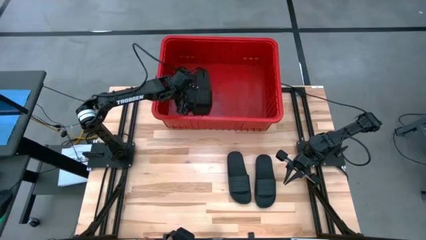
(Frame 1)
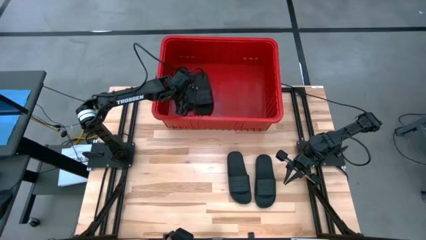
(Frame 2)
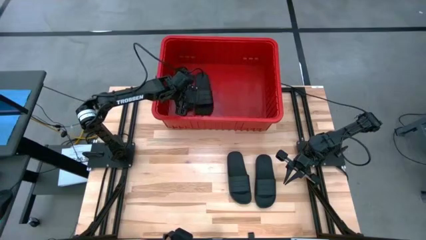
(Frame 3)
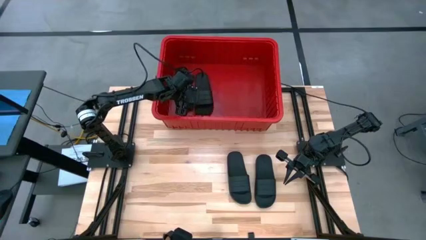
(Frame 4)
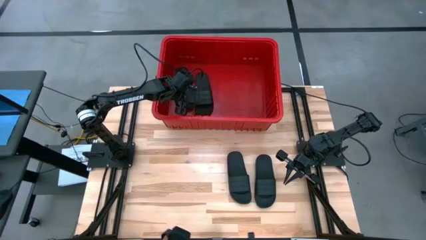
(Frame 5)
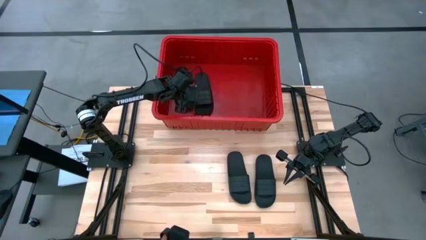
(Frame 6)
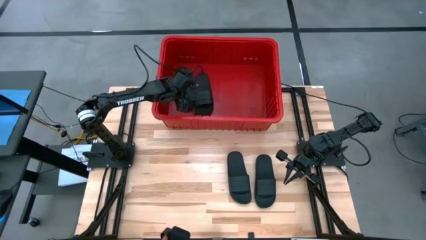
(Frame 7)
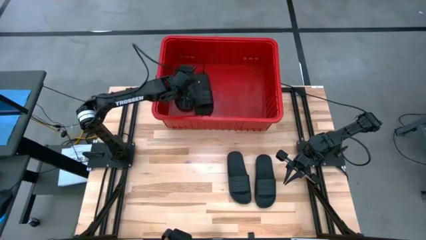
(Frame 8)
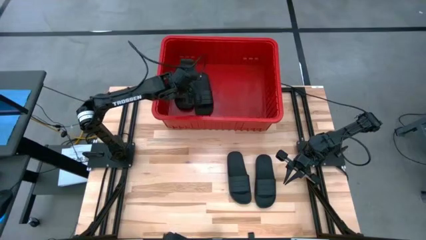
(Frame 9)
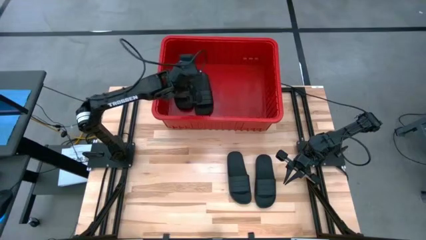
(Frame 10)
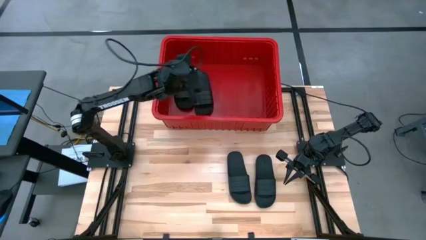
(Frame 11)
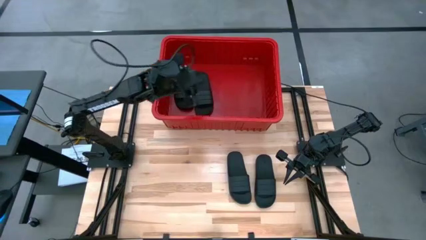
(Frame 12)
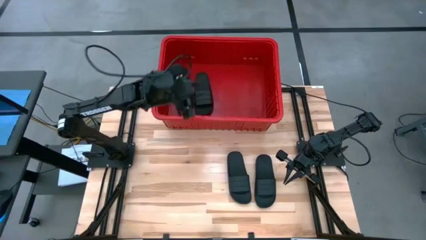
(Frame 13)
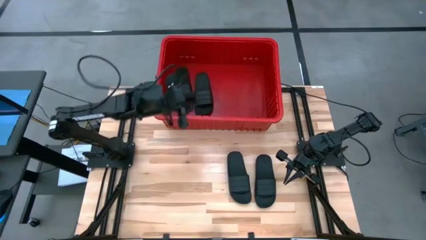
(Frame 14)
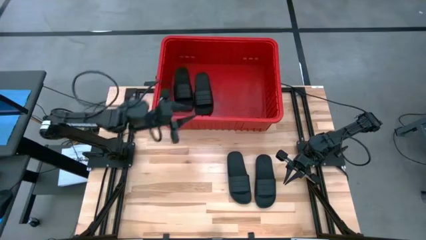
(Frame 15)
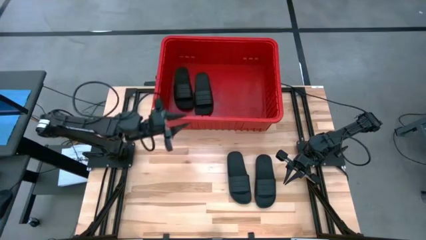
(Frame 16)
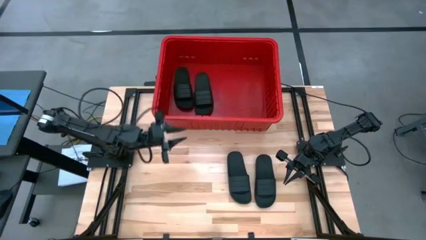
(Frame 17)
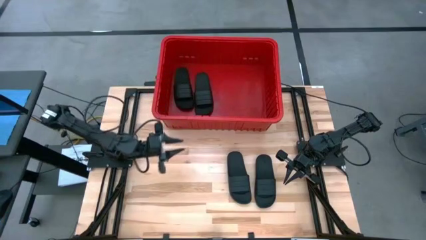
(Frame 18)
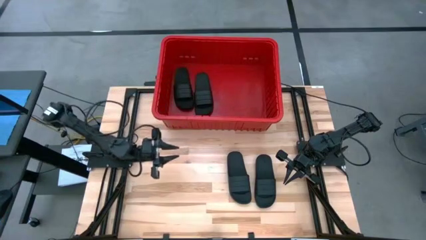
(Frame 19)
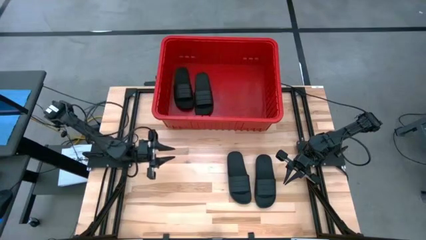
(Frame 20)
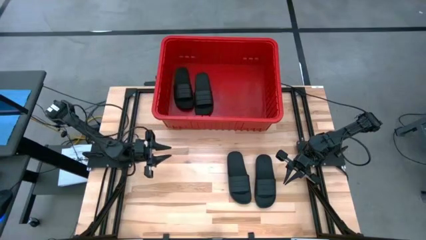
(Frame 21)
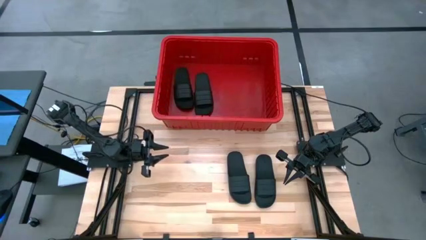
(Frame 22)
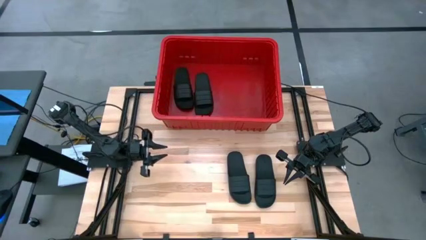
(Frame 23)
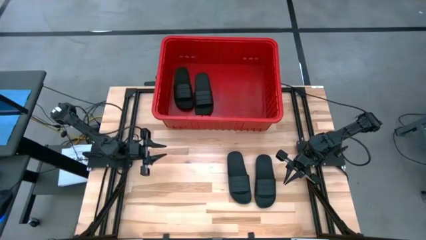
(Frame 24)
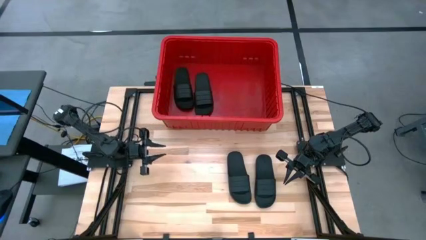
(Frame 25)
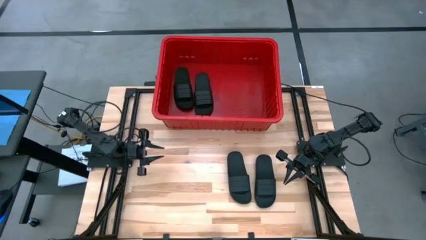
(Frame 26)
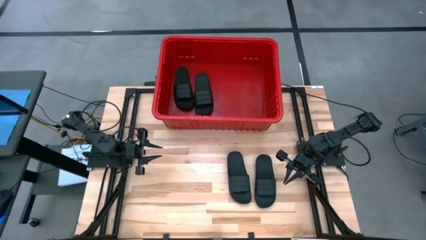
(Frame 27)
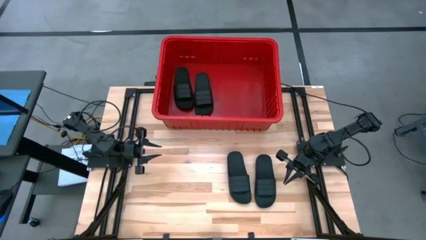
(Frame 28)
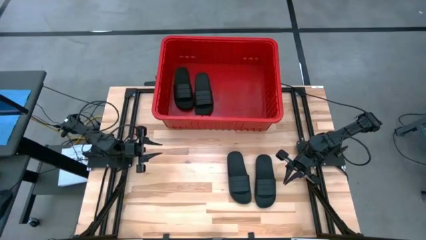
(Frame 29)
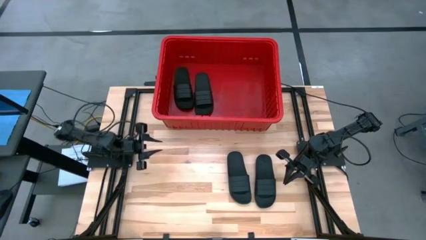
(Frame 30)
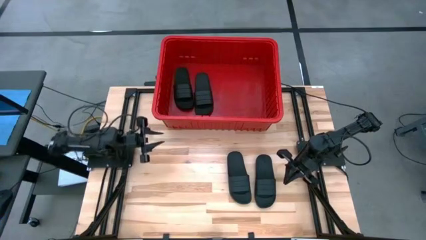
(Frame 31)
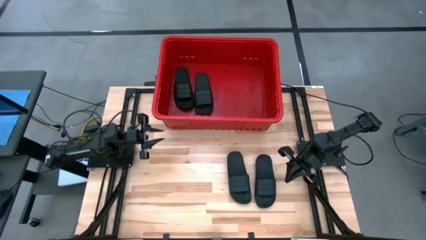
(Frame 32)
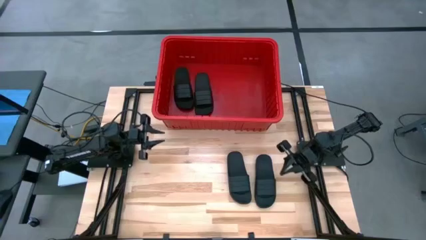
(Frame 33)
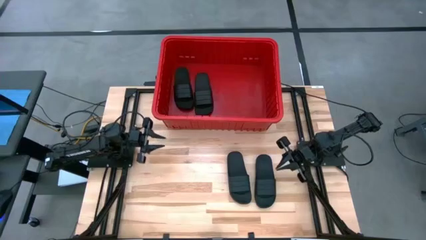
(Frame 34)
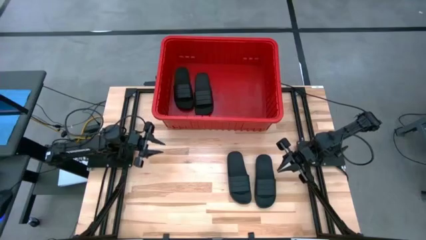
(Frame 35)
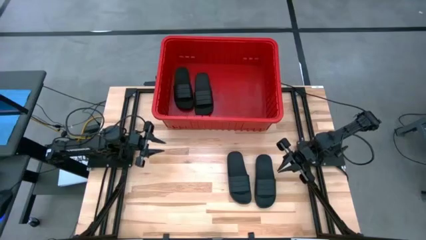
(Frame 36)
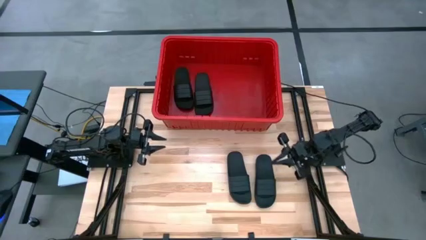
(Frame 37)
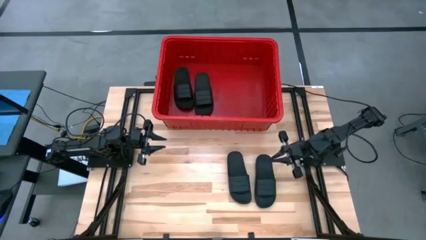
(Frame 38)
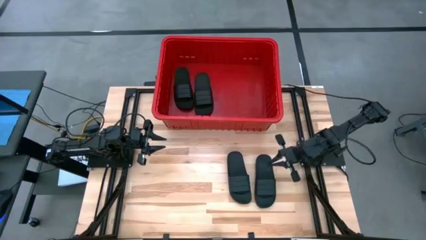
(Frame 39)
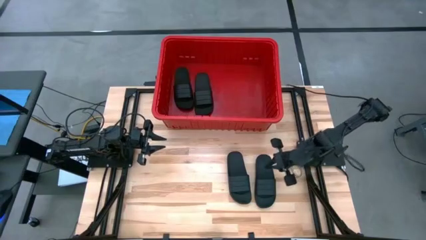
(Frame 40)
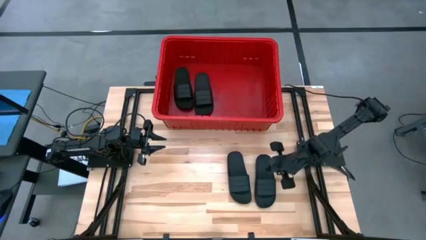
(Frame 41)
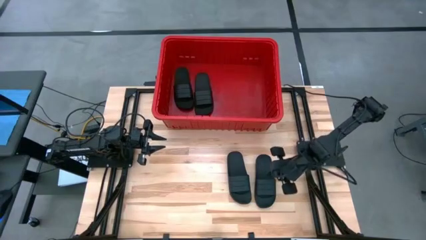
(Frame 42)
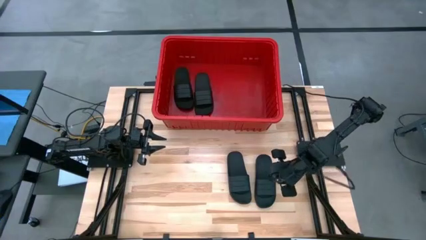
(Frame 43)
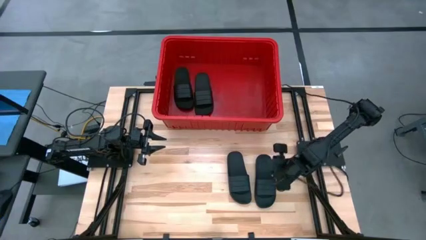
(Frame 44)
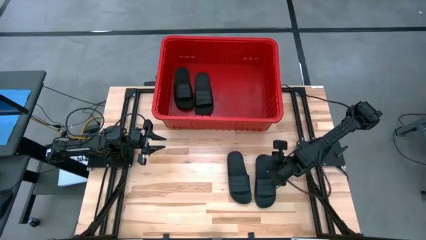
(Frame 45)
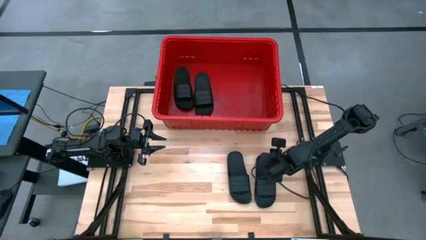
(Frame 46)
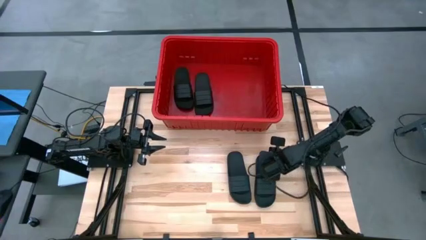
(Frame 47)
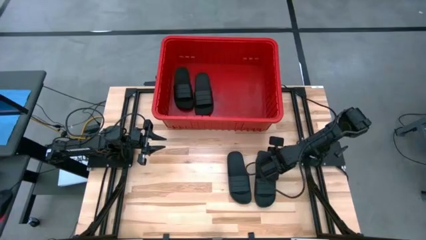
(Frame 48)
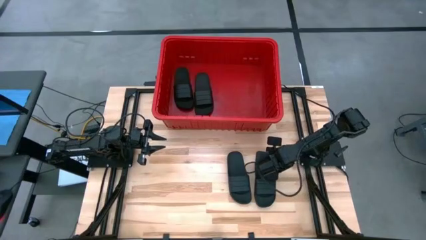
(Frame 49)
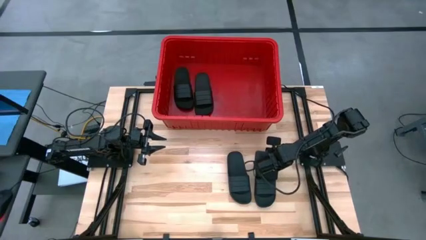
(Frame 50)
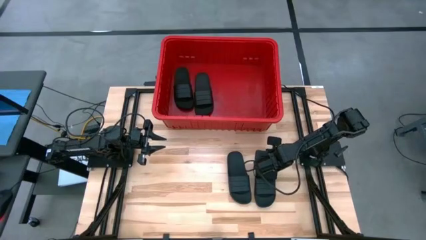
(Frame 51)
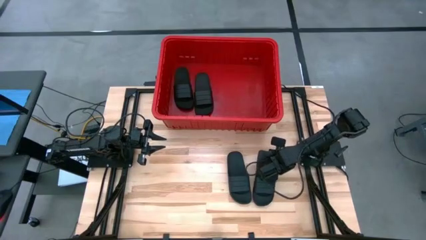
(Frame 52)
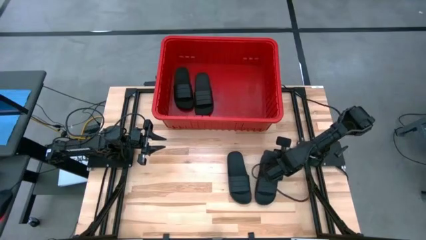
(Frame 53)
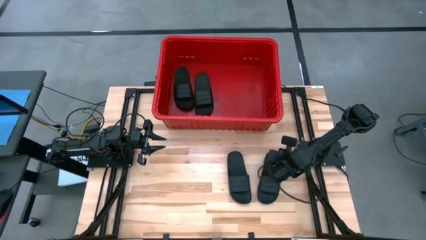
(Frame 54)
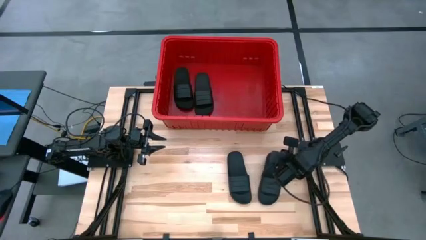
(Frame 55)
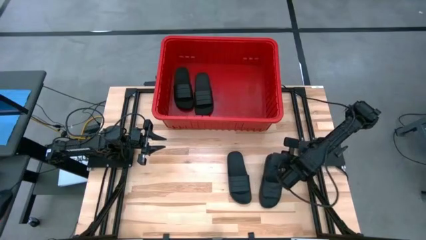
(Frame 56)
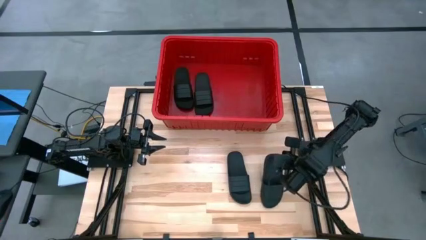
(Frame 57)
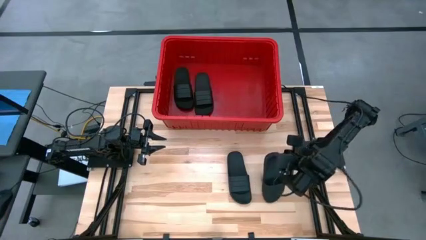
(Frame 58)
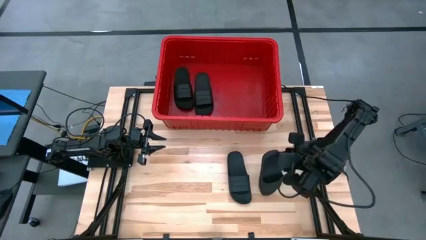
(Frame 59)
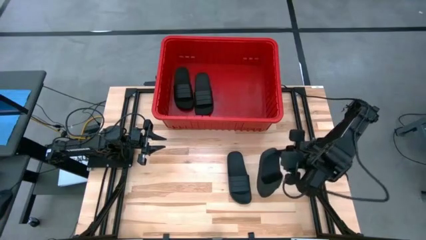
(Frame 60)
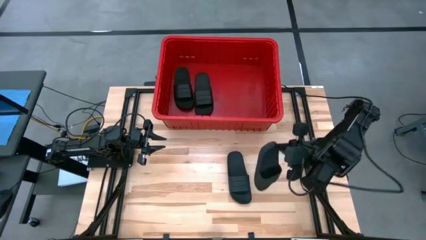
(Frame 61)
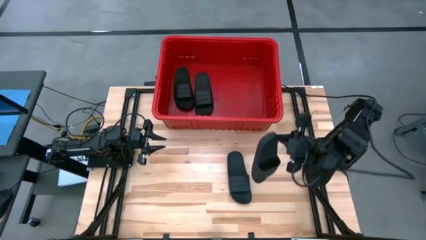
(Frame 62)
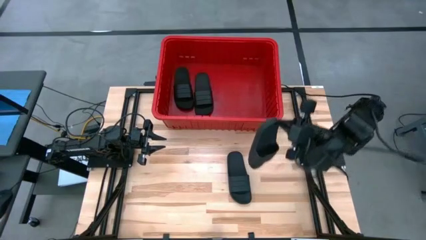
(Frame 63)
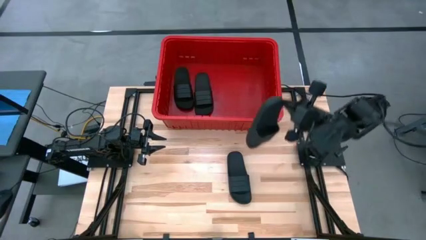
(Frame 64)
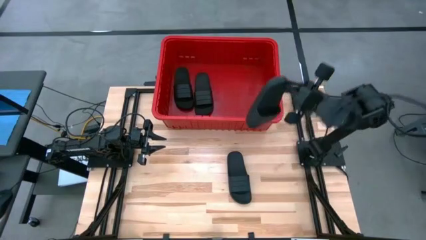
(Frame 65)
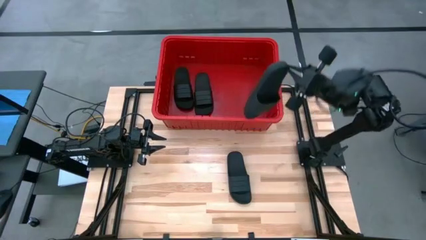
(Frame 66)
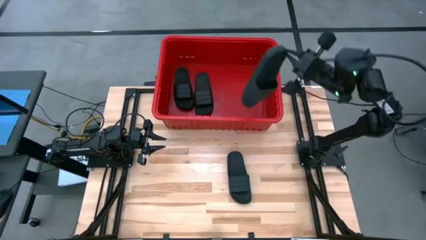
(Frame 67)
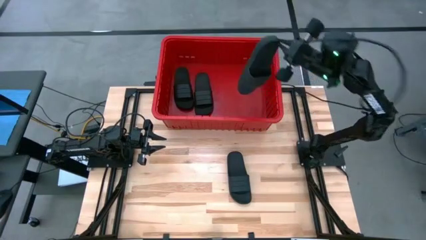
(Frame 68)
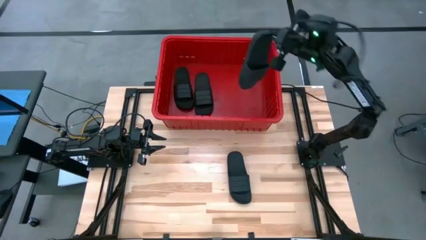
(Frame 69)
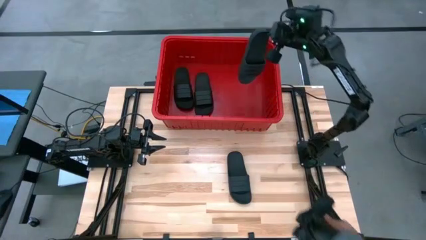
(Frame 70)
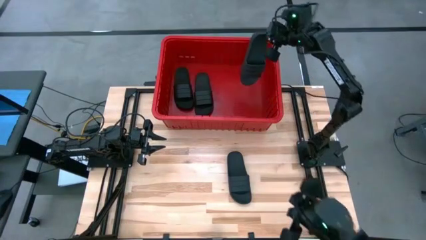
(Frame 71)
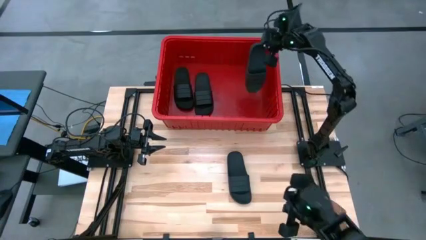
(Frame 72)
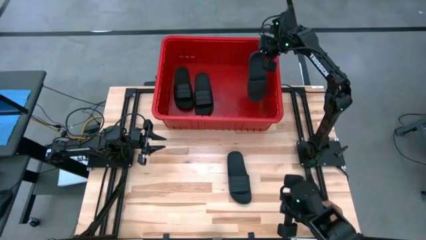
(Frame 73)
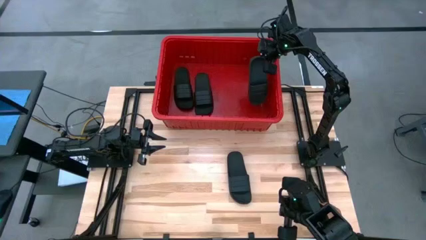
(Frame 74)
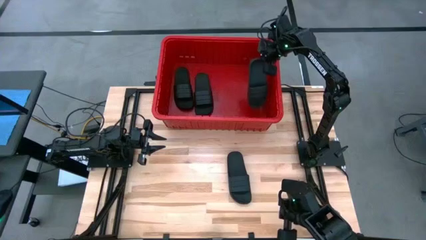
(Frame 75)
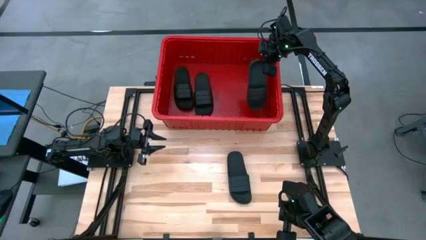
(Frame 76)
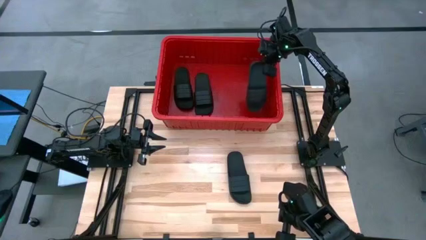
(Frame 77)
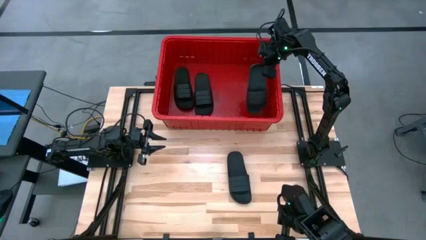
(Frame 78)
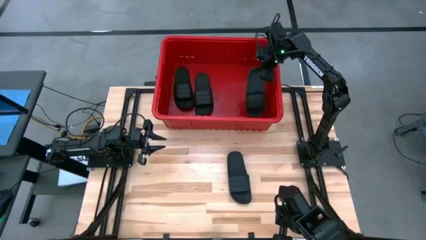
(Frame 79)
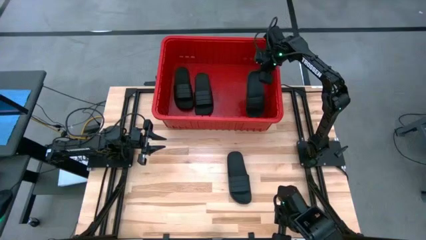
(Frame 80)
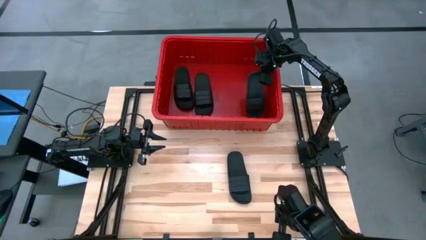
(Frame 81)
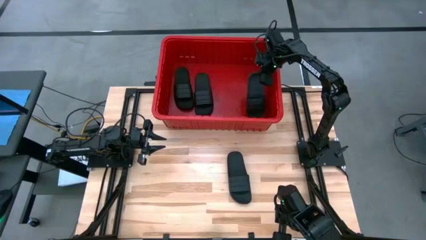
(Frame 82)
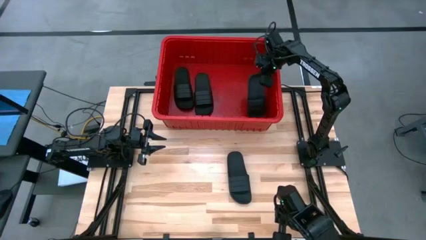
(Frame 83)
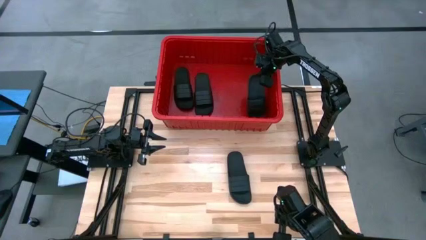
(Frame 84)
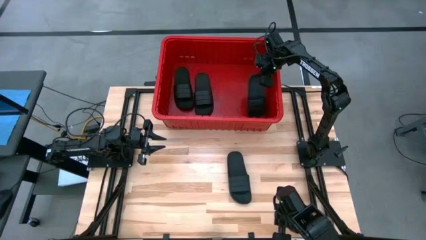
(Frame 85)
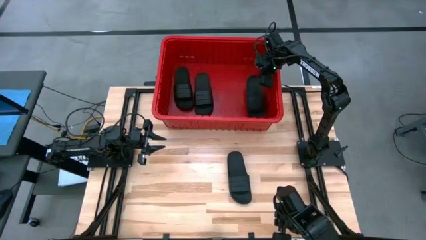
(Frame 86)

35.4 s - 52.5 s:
Task: Pick and place slides into bin
Put the black slipper into the red container
